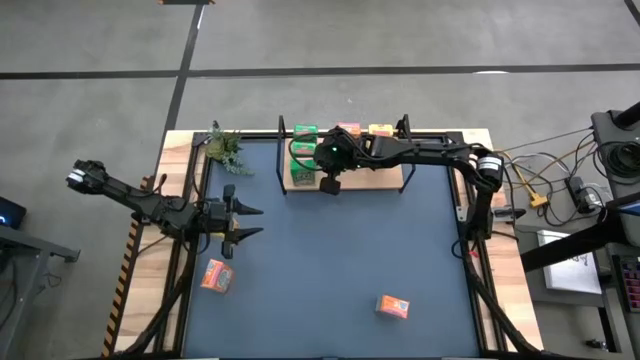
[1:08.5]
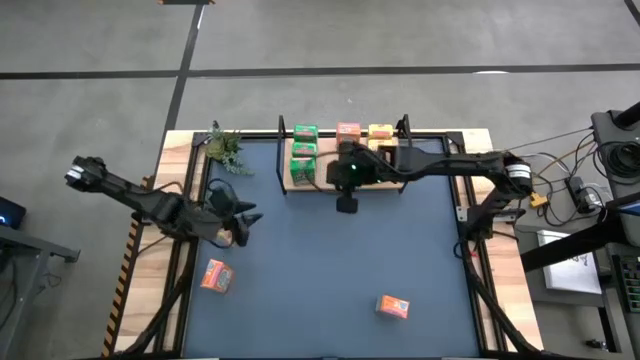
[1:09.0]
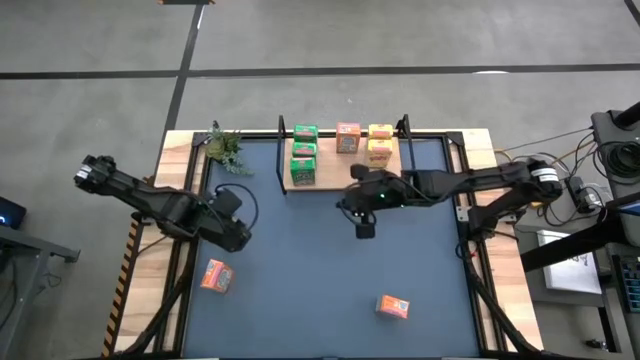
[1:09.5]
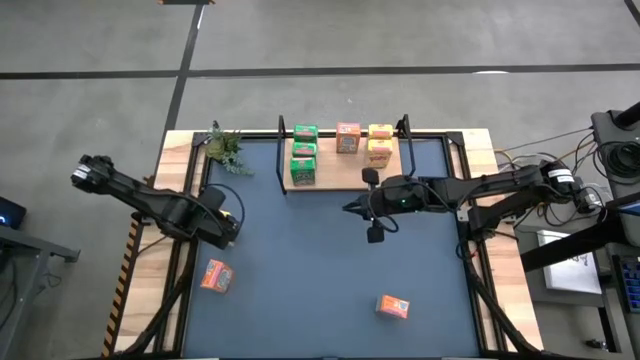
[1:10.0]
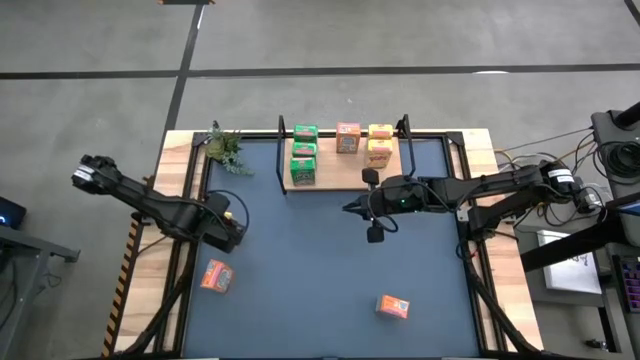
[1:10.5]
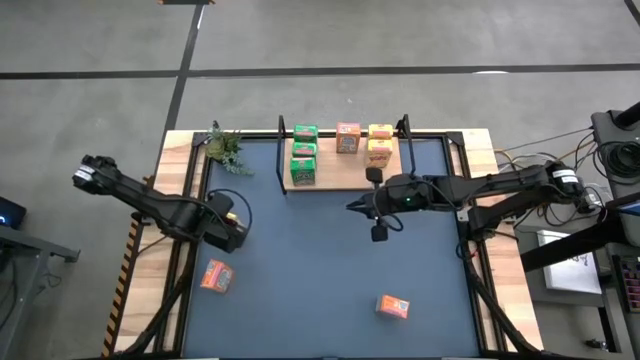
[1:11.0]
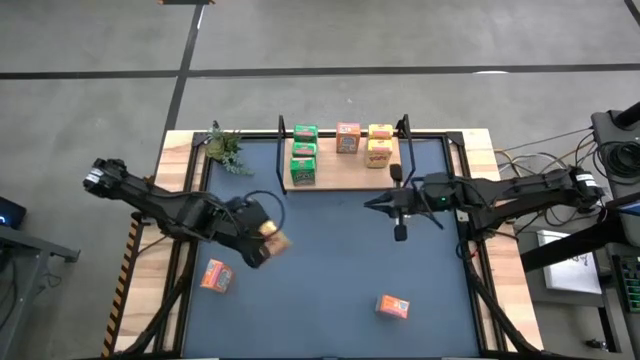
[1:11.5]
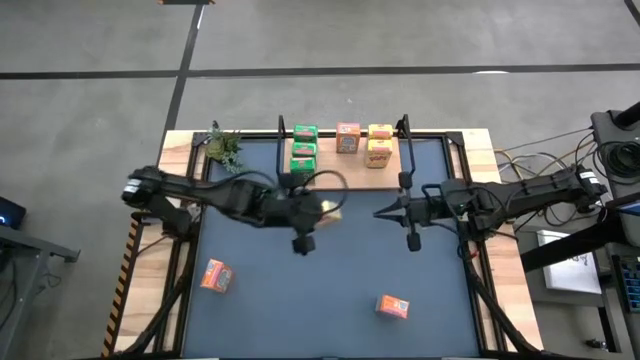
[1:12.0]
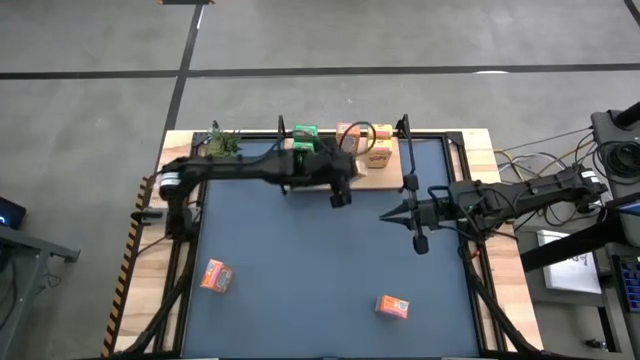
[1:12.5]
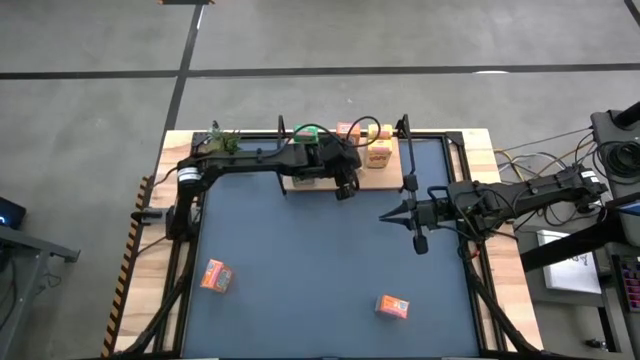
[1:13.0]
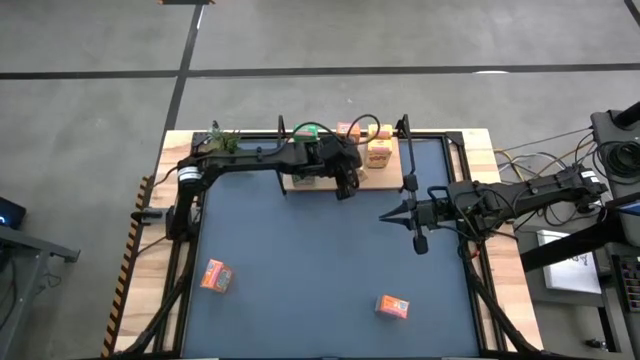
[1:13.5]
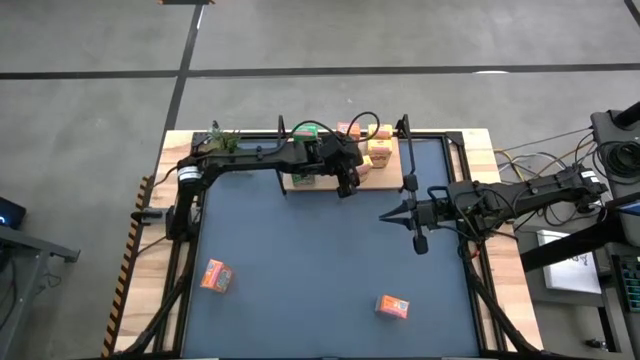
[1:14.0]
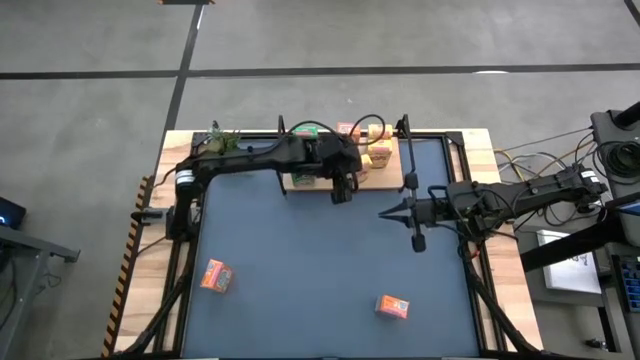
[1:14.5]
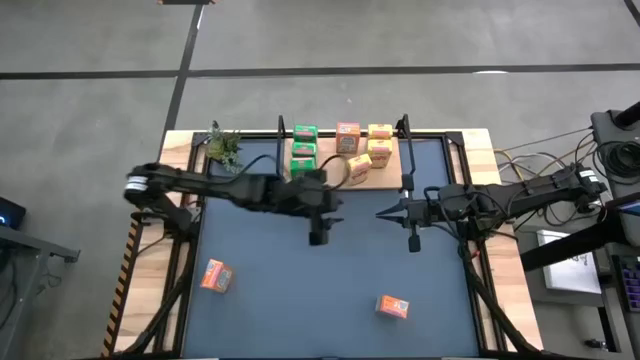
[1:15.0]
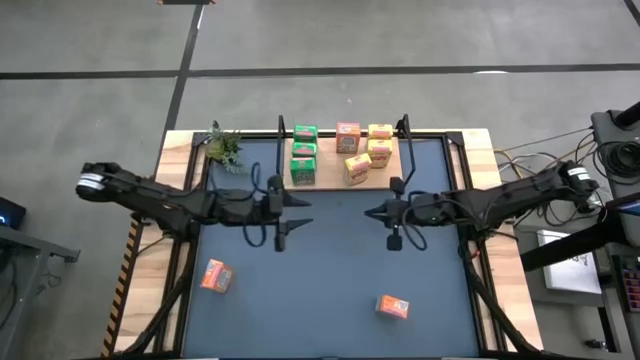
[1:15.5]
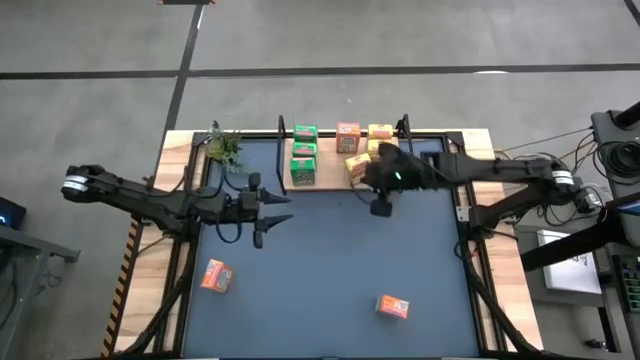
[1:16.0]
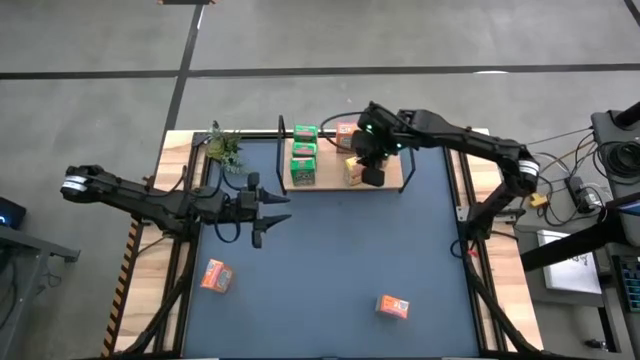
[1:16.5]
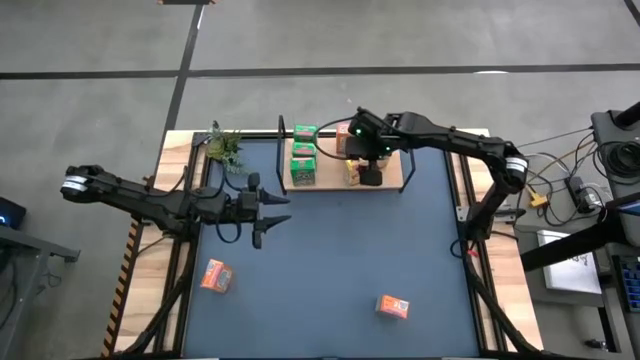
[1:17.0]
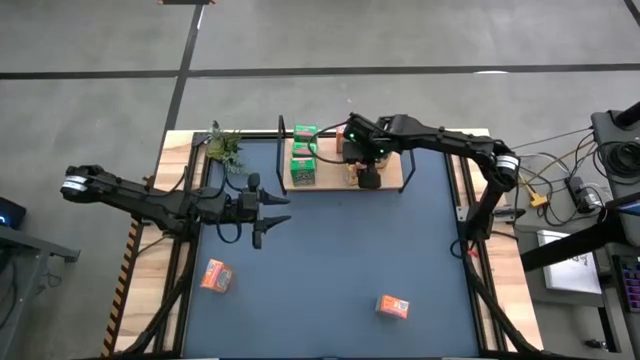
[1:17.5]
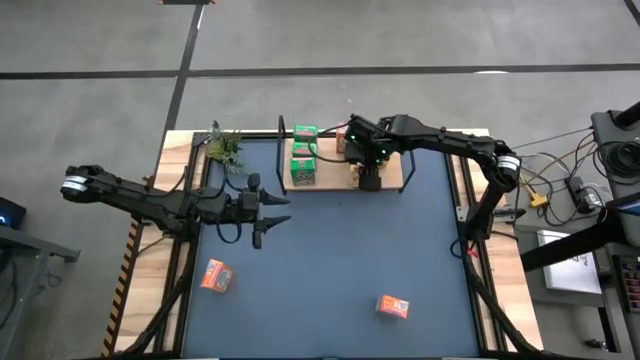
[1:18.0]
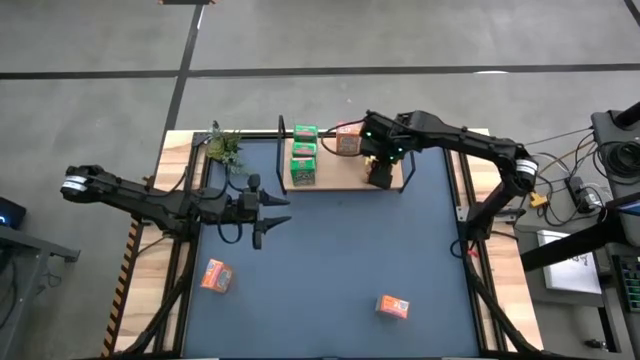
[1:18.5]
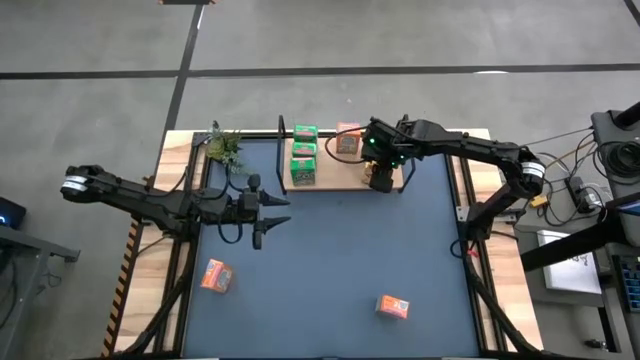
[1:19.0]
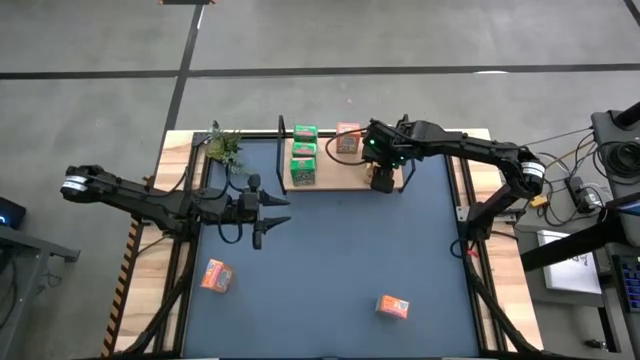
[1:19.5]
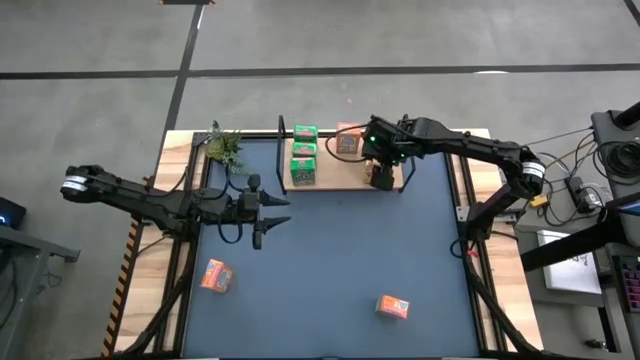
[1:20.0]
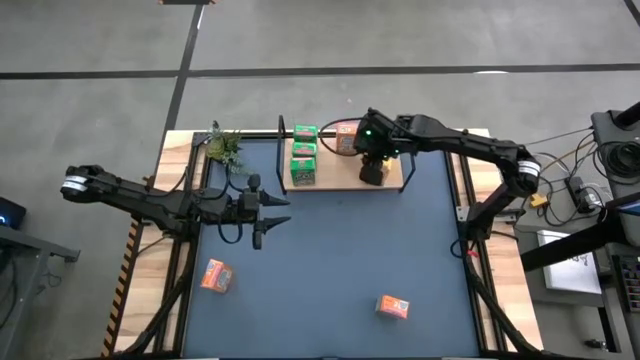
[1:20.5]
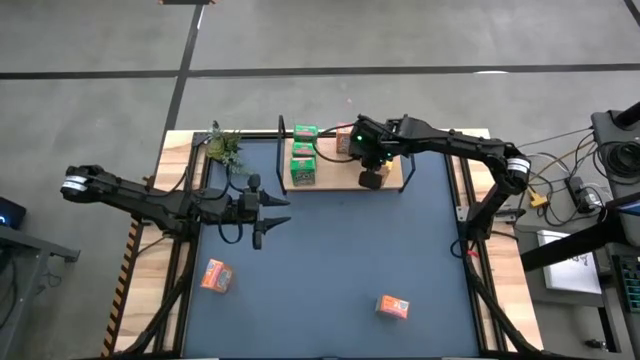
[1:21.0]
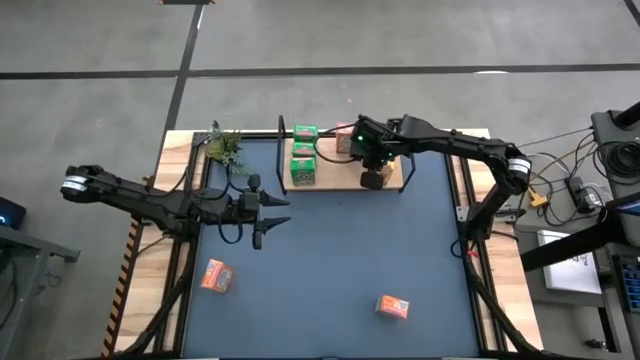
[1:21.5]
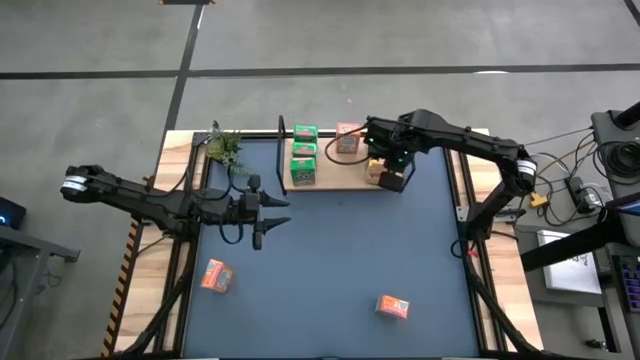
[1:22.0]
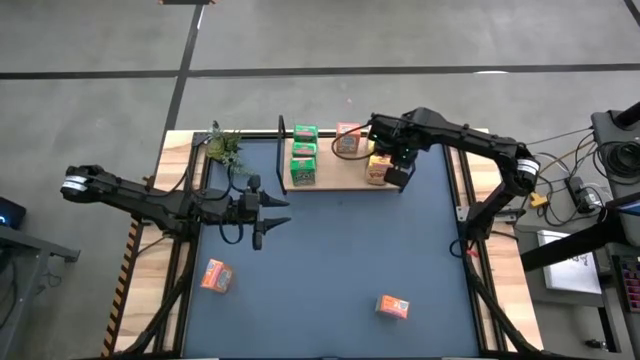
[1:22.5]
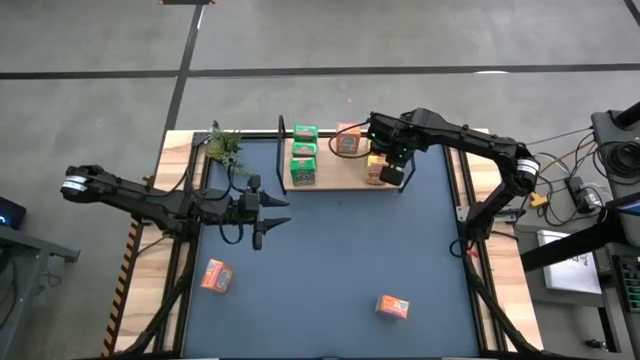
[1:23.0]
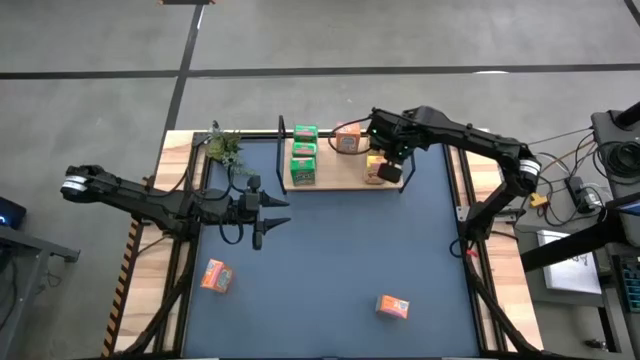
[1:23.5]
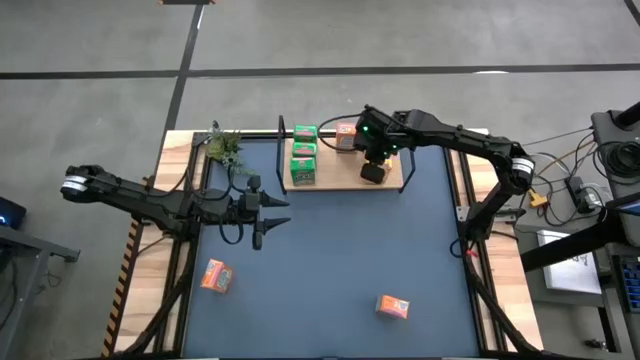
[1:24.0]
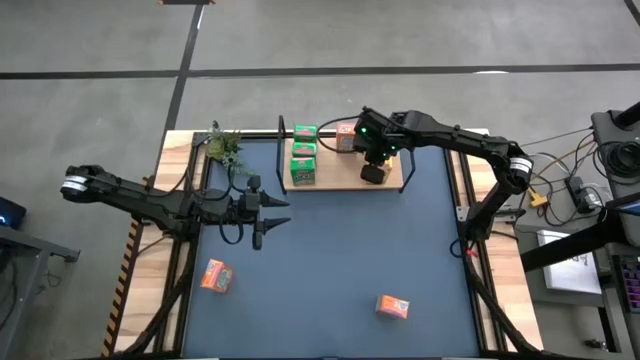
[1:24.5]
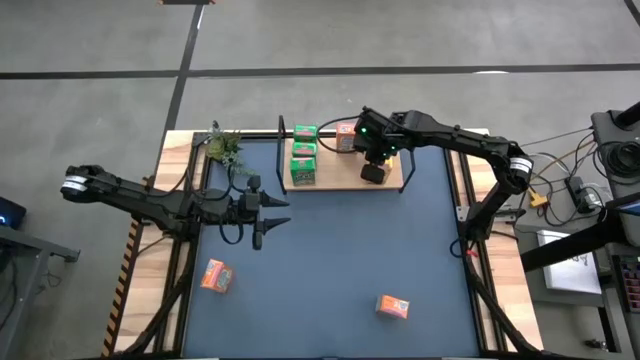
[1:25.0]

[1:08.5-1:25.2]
Task: Stack cereal on shelf
Stack the yellow cereal box on the shelf

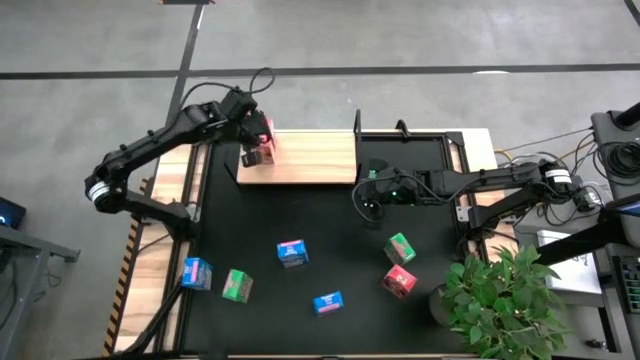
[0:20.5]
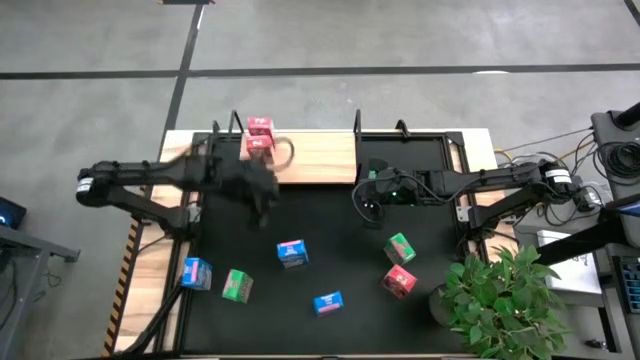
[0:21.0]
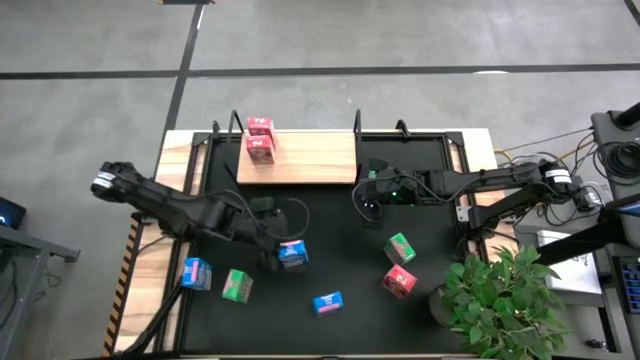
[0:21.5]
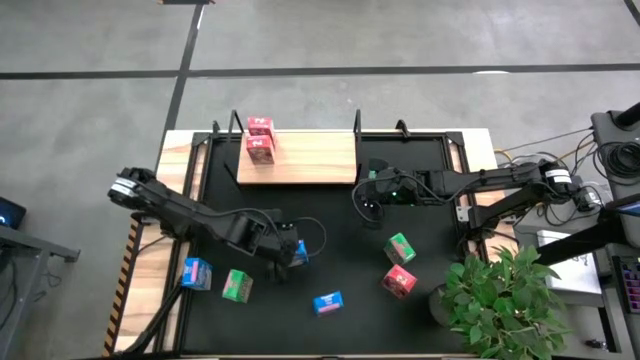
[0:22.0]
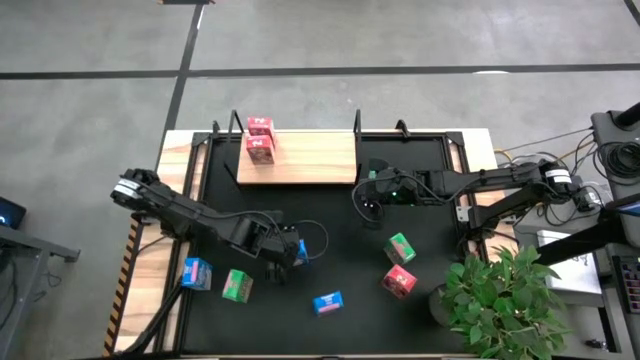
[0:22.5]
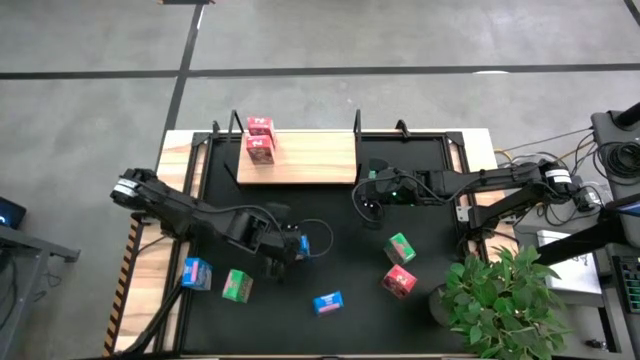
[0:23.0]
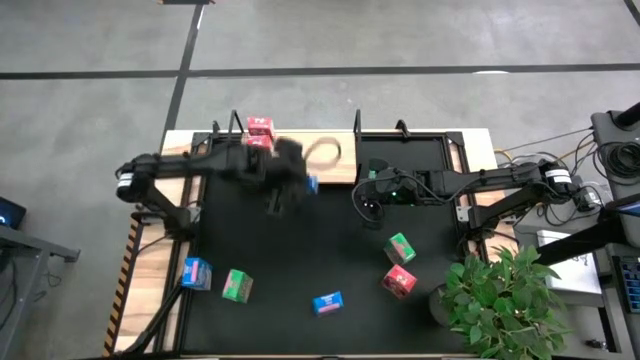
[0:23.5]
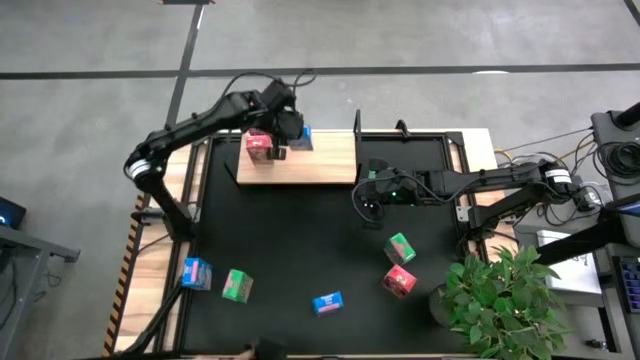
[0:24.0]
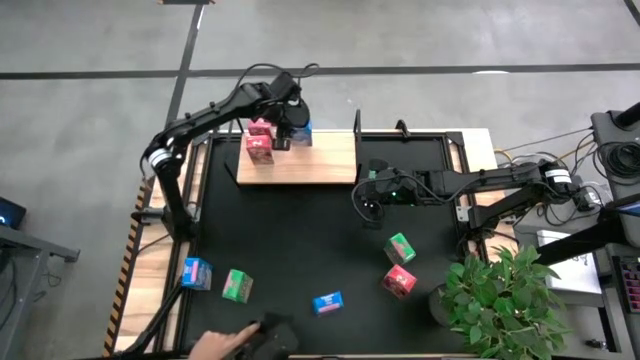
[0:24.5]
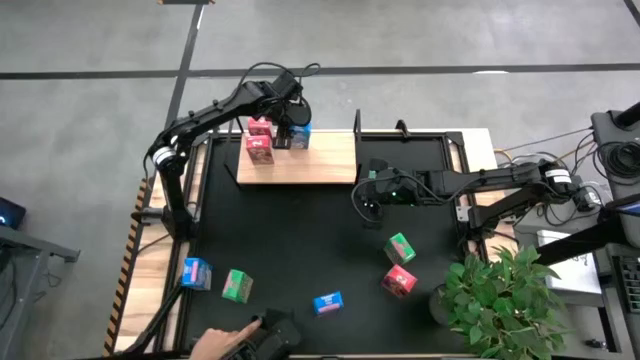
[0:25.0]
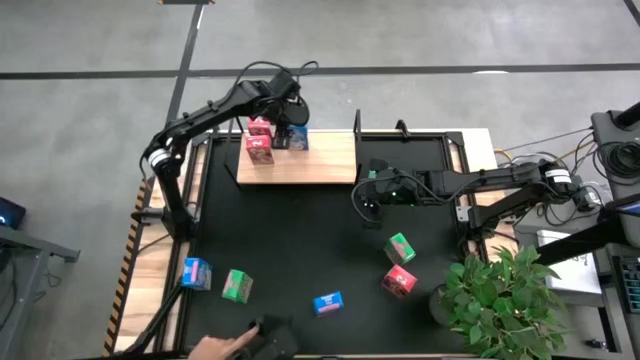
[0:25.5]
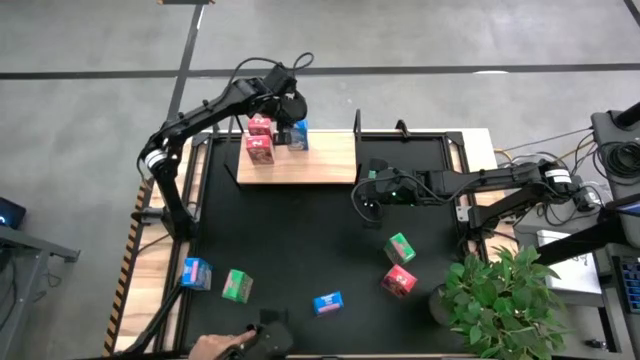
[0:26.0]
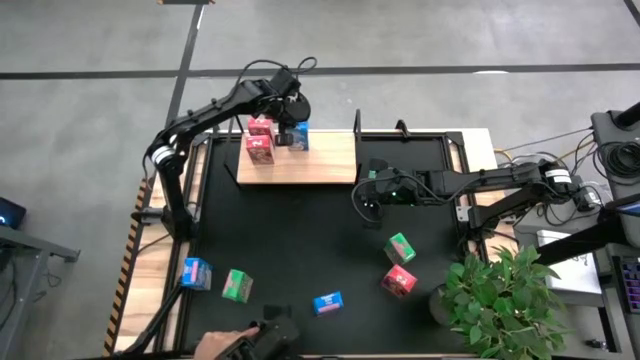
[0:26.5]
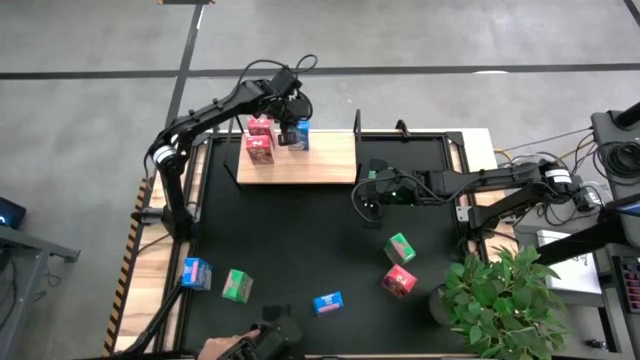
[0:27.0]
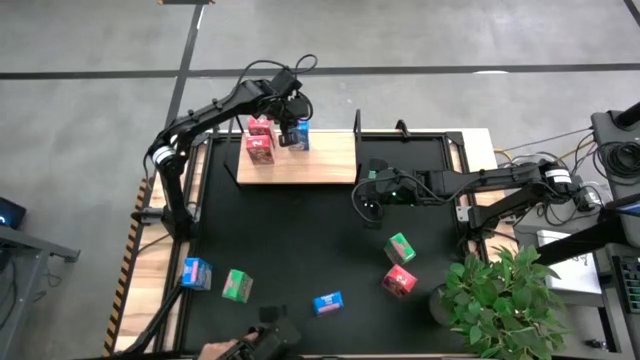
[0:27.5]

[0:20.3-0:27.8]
Task: Stack cereal on shelf
Put the top blue cereal box on the shelf
